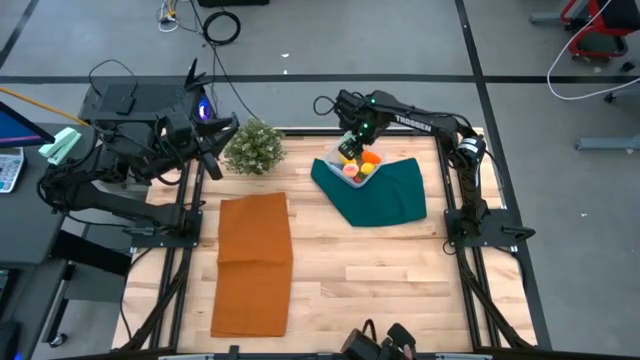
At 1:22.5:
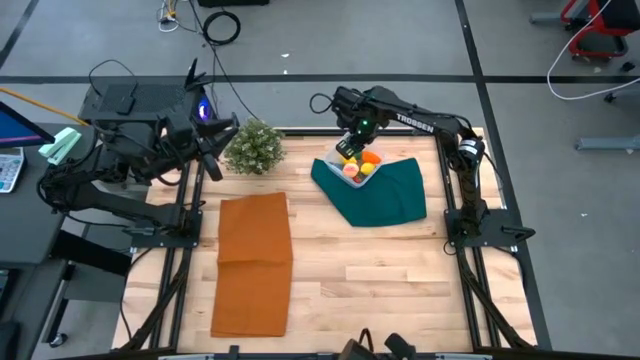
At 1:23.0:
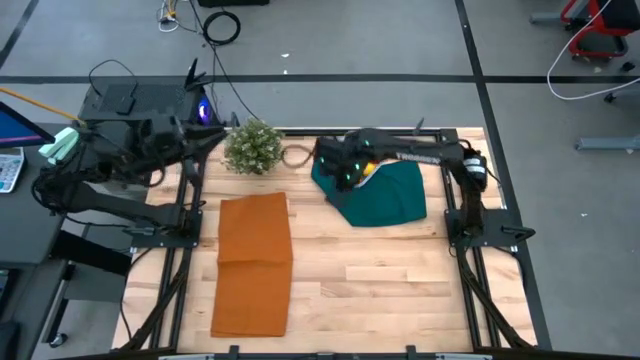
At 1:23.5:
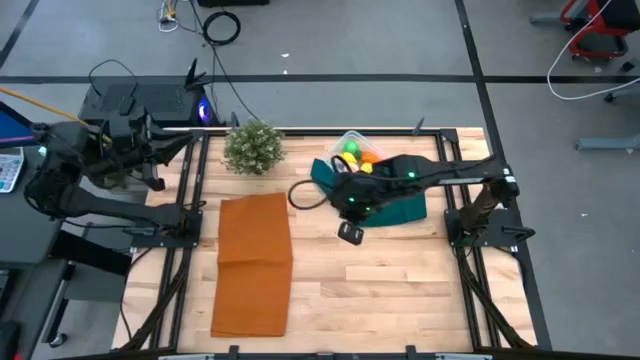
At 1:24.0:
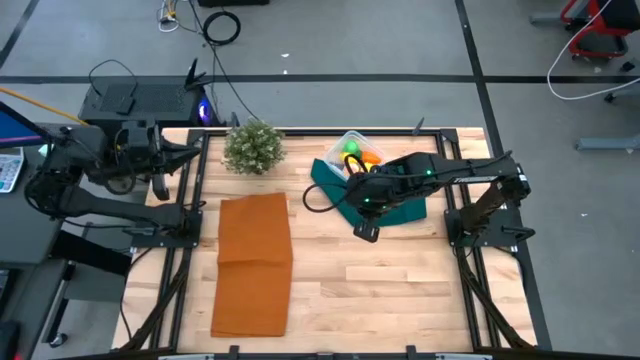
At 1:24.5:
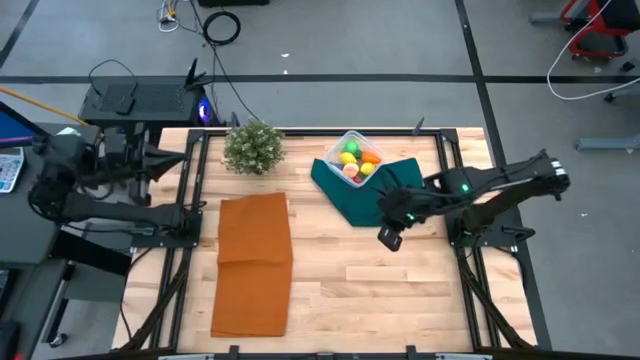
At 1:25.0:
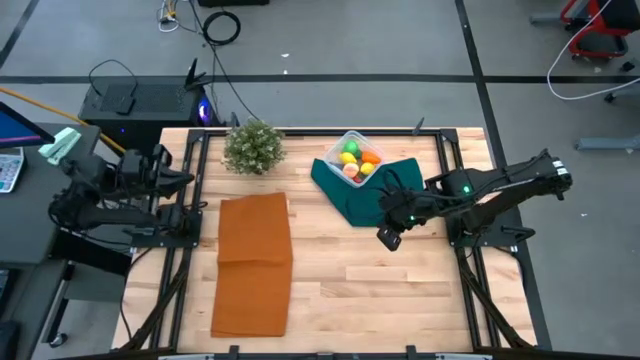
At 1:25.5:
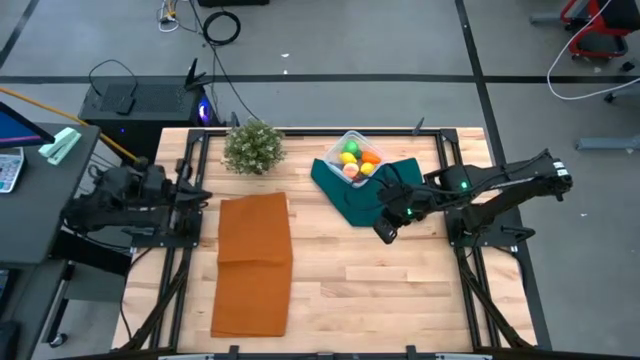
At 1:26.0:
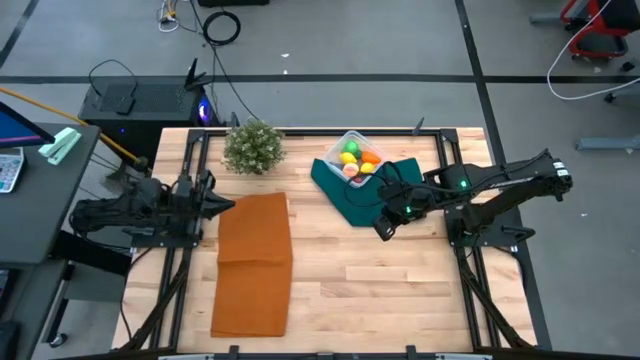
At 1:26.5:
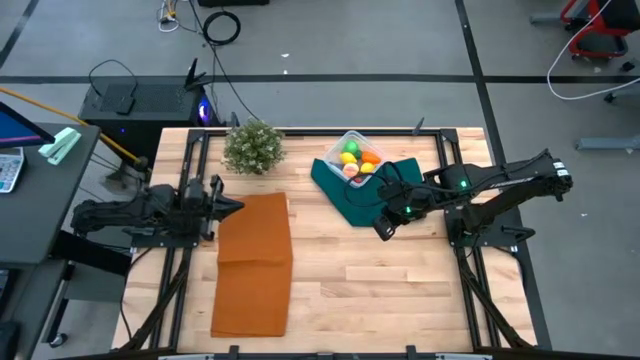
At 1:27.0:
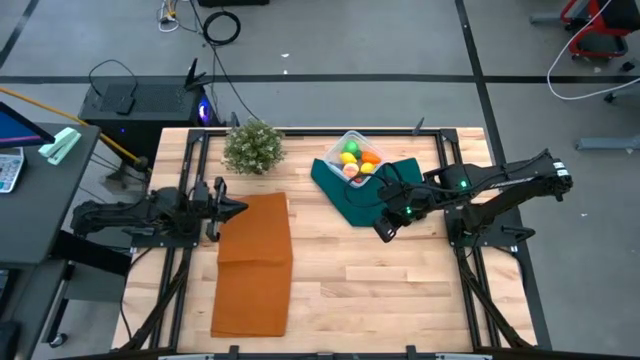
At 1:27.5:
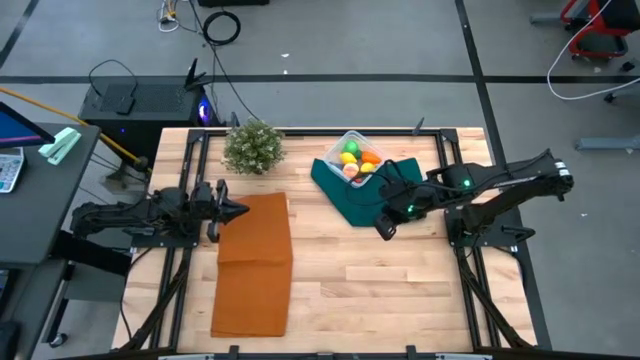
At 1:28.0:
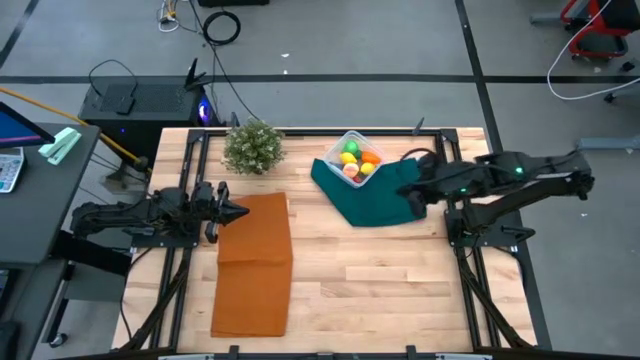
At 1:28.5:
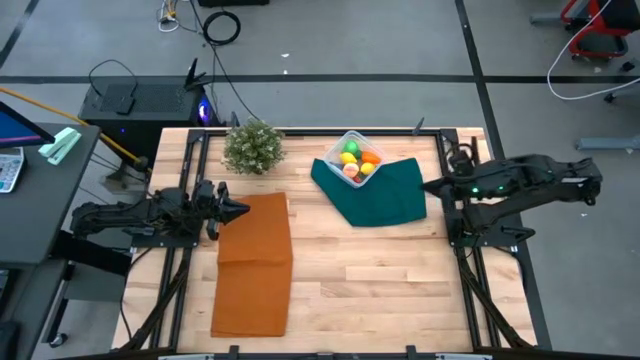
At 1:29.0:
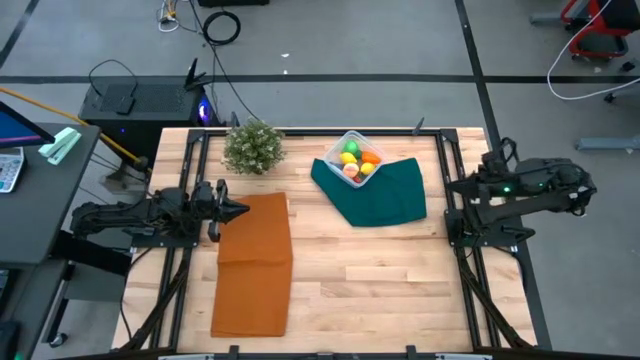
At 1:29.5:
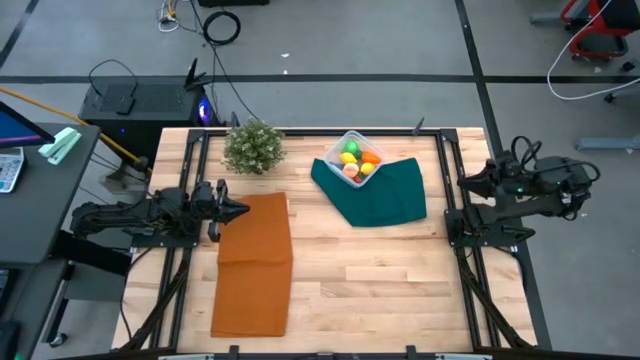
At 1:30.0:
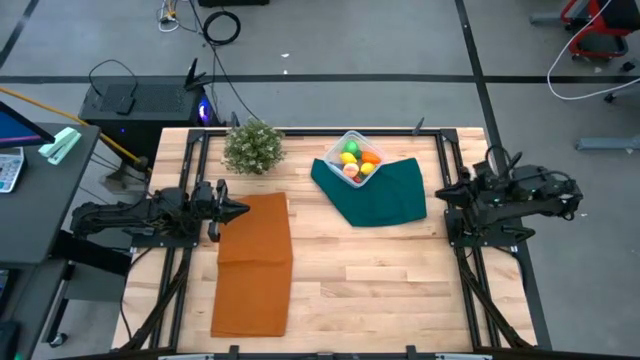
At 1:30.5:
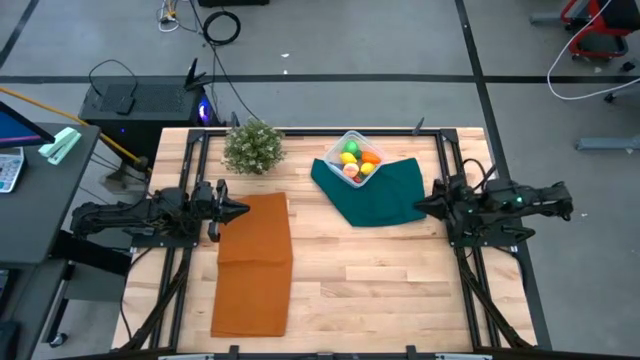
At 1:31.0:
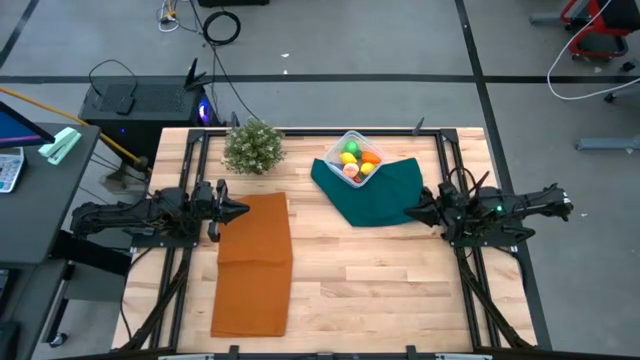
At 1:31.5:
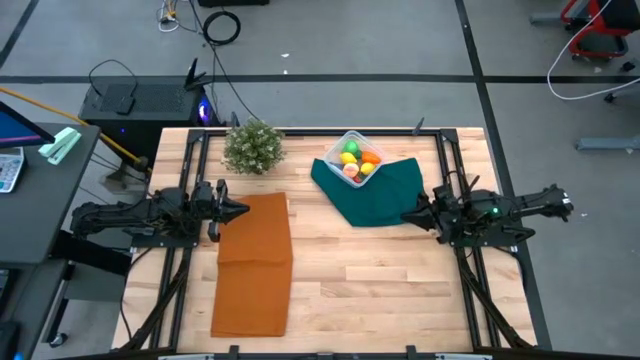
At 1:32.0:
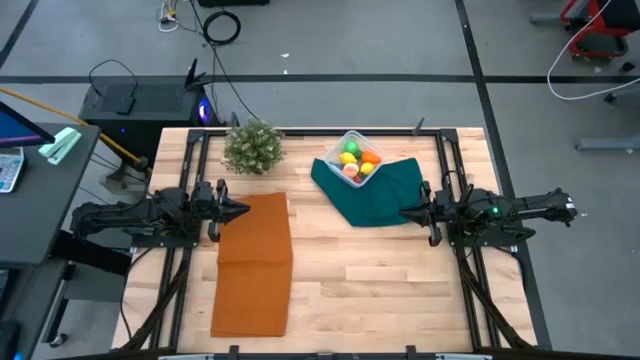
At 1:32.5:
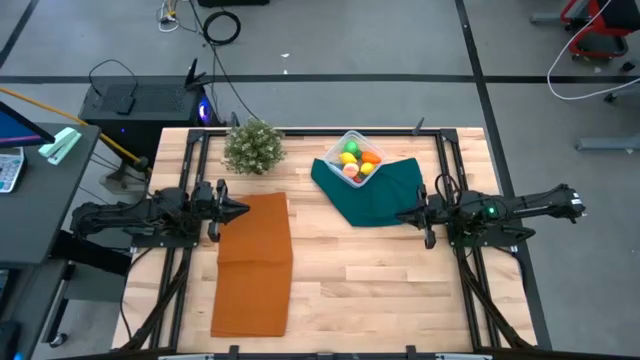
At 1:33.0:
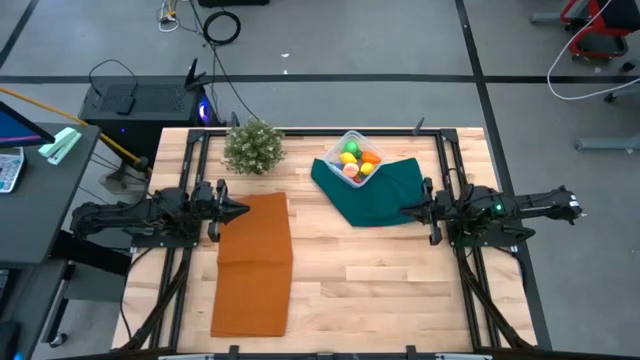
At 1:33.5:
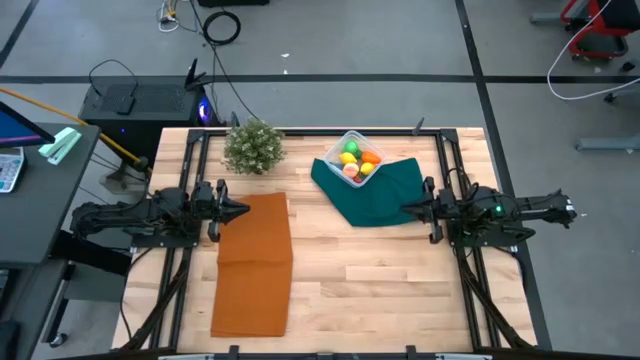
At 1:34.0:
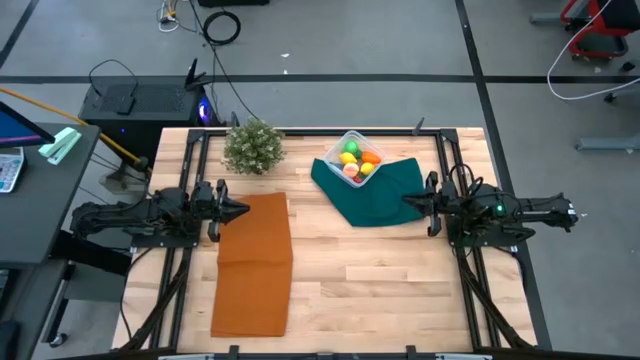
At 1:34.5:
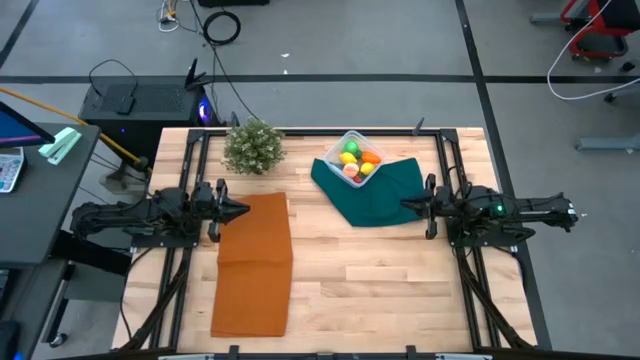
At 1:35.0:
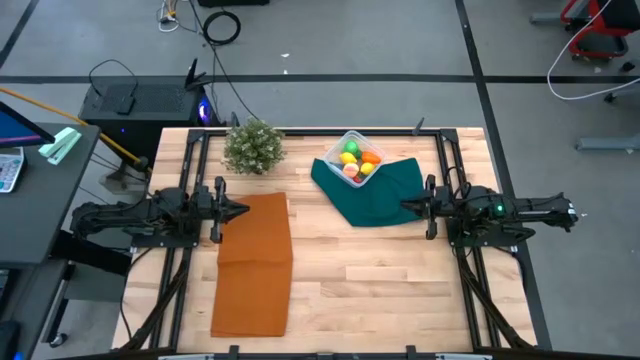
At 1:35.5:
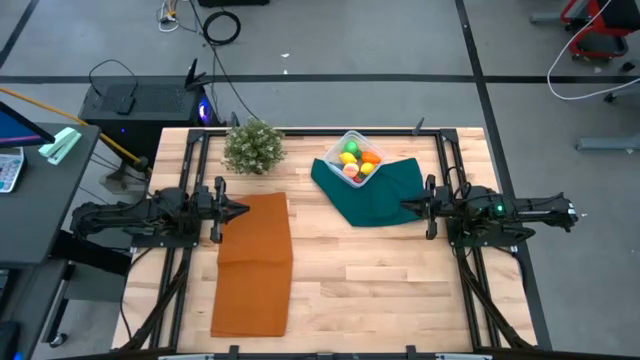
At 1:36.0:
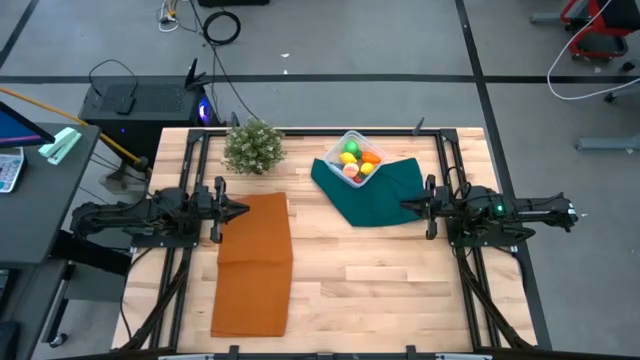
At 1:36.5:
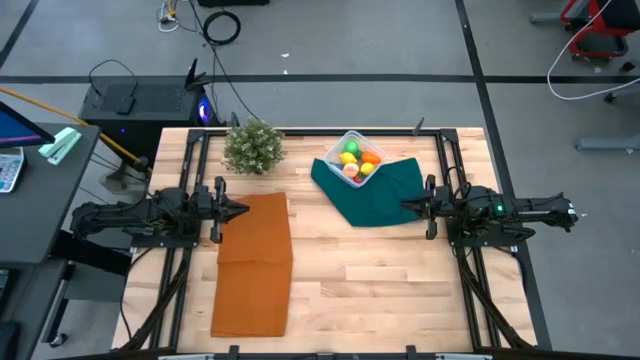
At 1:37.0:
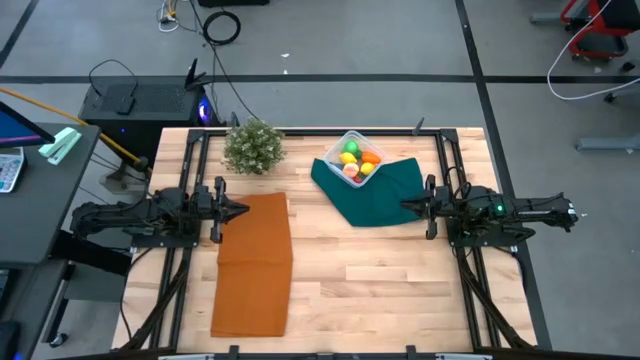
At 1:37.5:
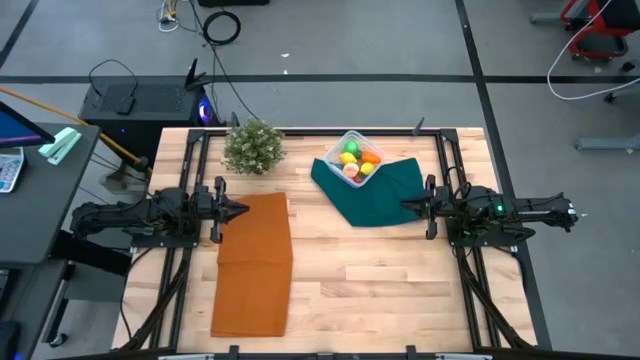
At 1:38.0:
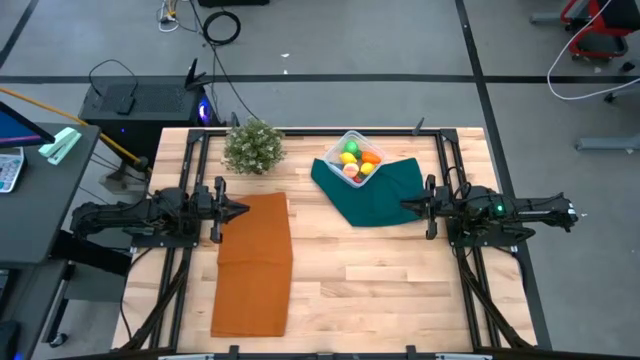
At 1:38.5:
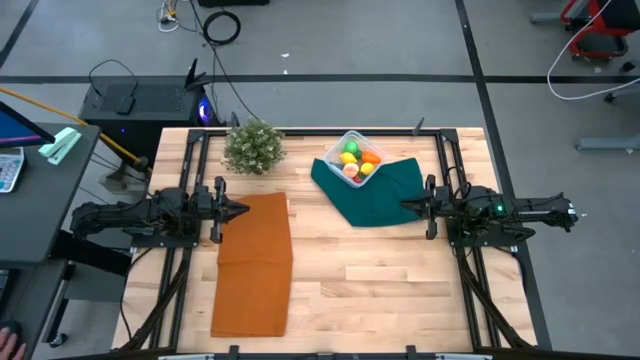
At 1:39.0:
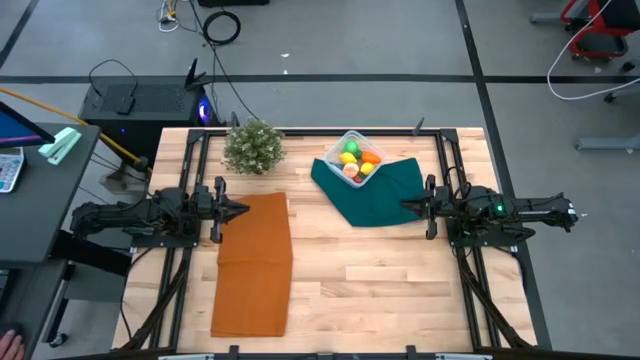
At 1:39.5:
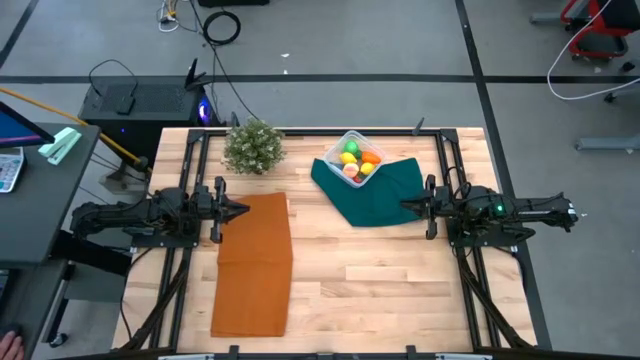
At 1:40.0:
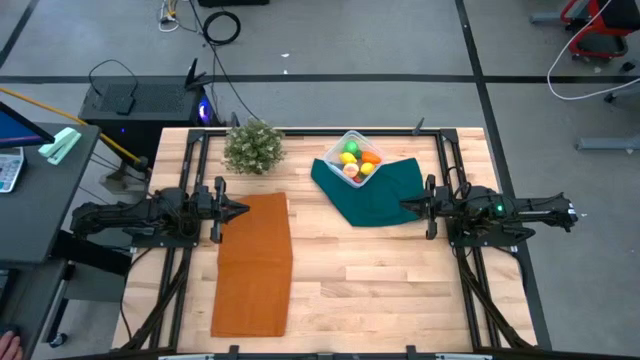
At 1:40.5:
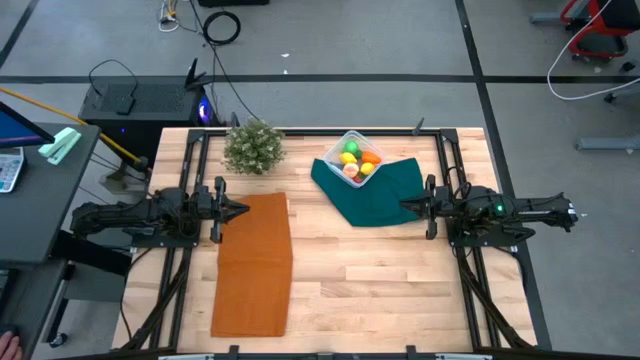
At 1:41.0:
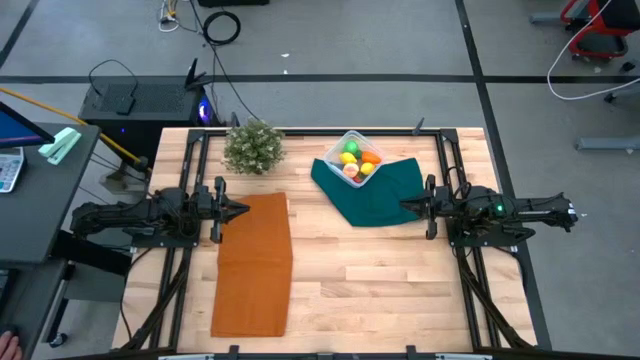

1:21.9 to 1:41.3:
Task: Pick and placing Produce into tupperware
Return to Home Position

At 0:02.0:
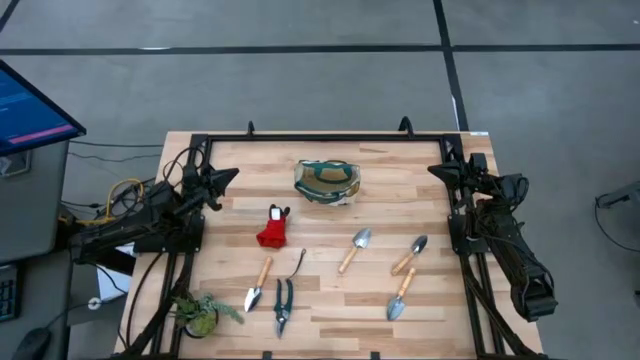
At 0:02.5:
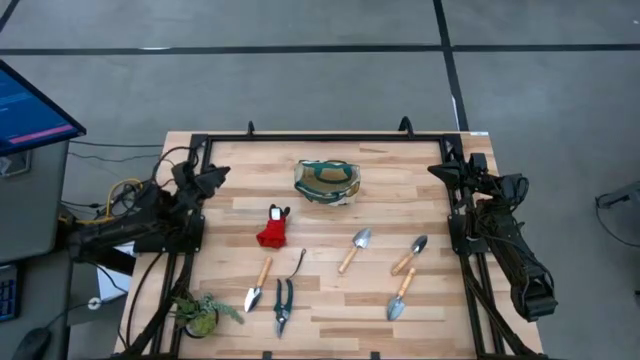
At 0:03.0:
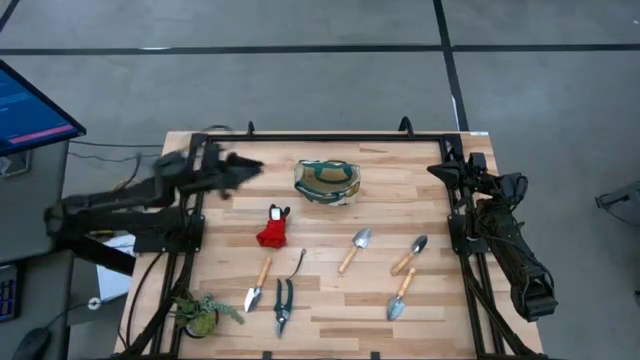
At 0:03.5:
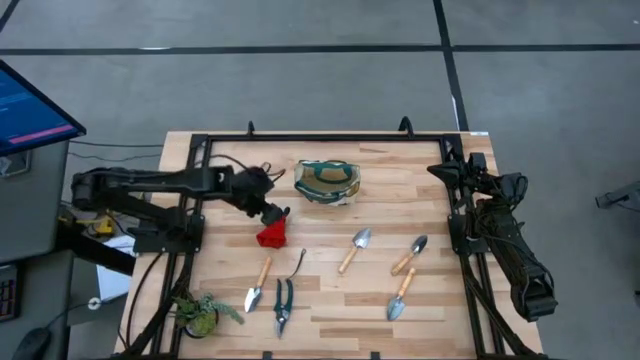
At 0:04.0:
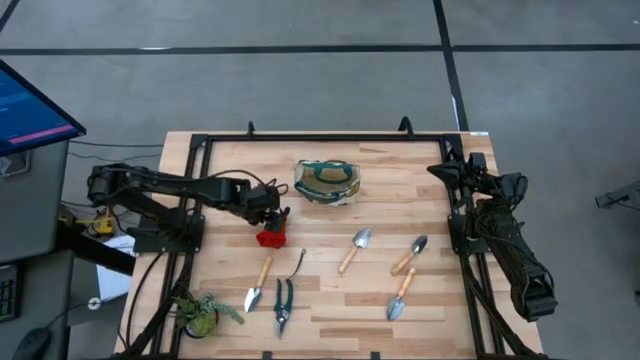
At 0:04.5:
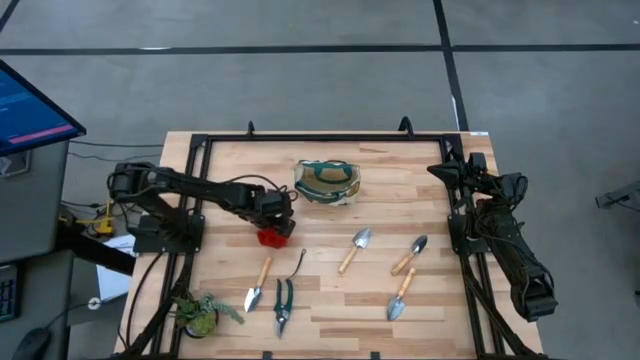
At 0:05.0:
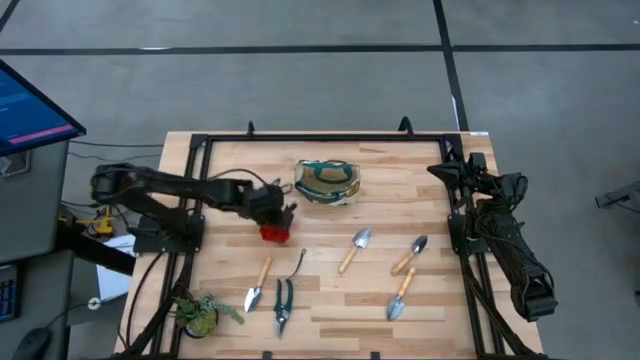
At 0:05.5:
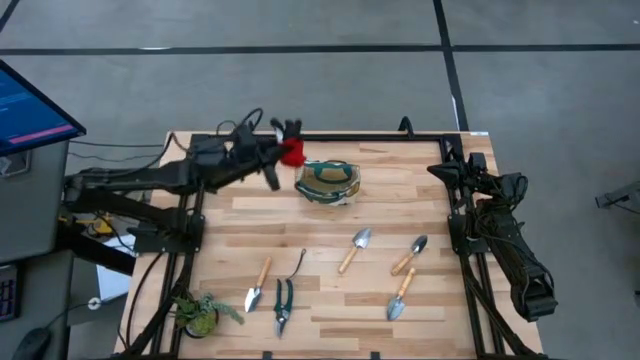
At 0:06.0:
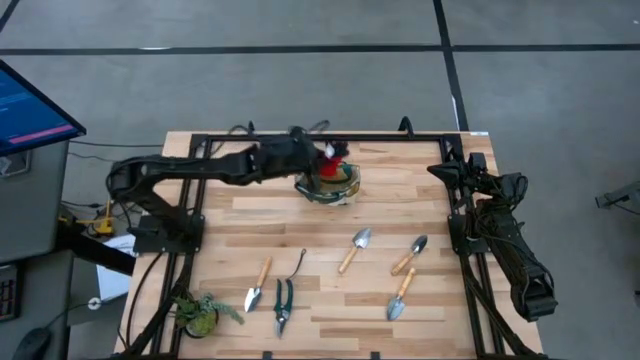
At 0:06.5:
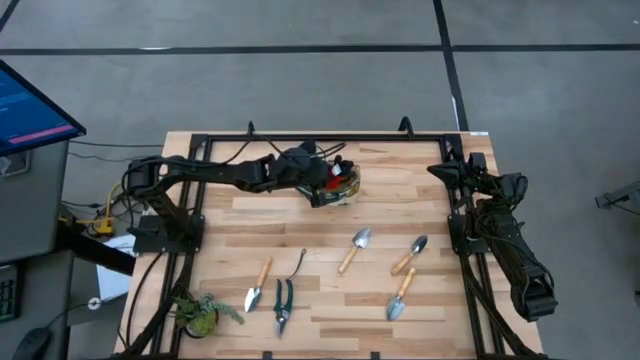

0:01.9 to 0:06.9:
Task: Pick & Place Garden tools in Gardening bag
Put the red gloves into the white gardening bag
